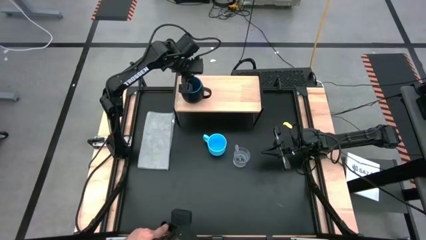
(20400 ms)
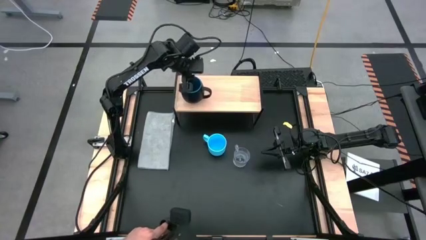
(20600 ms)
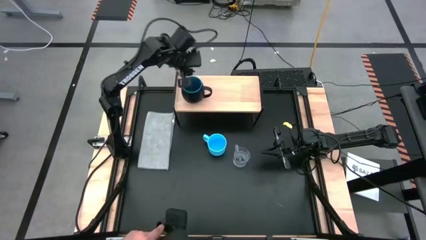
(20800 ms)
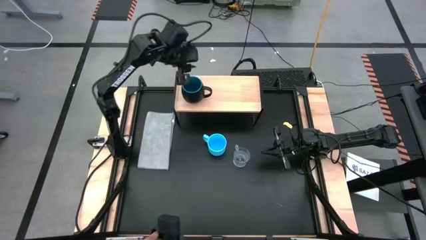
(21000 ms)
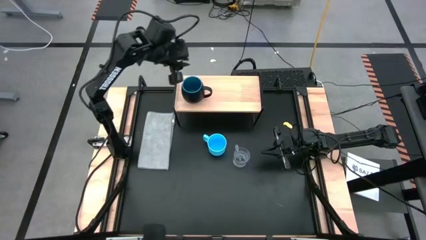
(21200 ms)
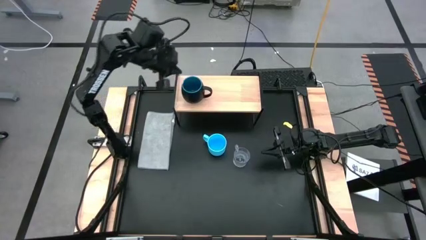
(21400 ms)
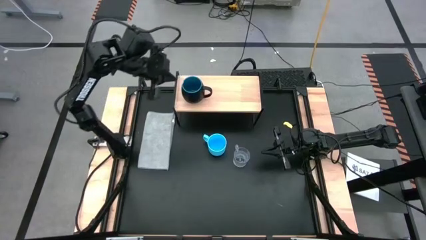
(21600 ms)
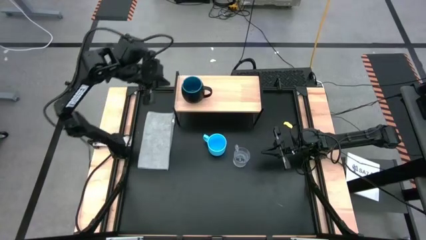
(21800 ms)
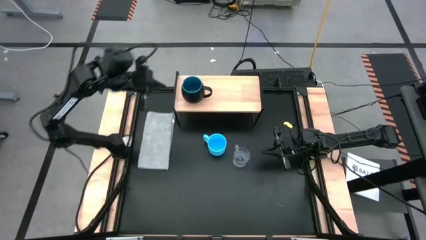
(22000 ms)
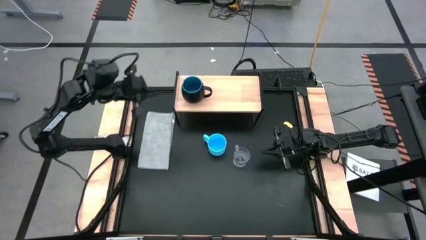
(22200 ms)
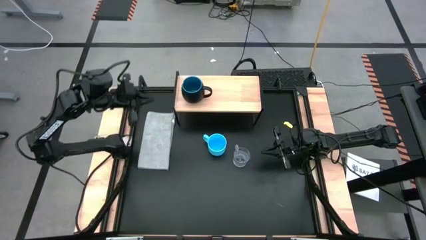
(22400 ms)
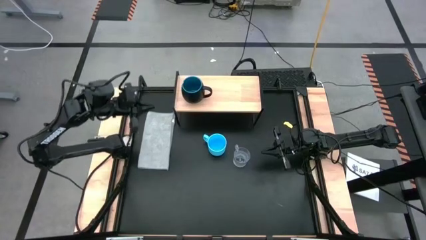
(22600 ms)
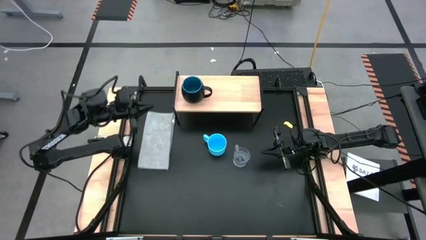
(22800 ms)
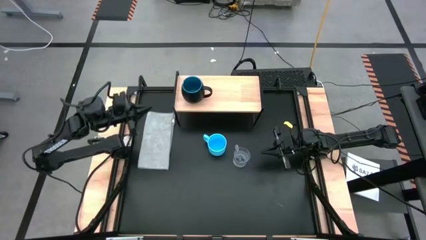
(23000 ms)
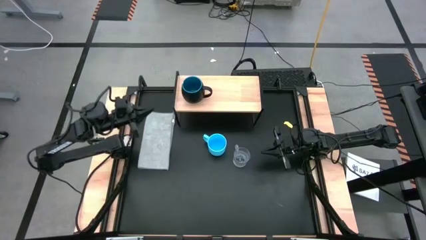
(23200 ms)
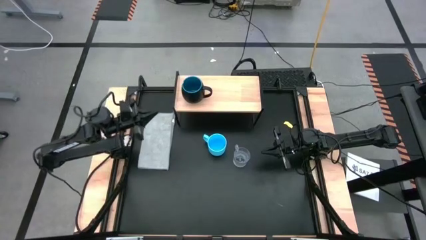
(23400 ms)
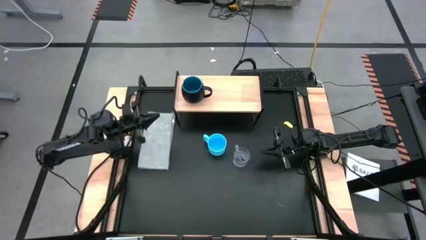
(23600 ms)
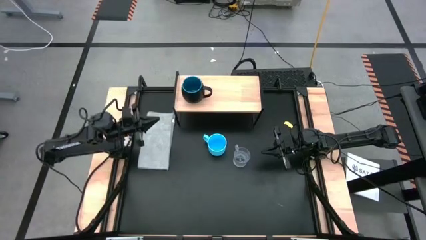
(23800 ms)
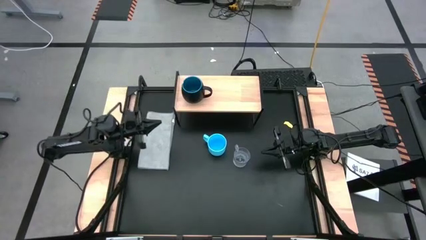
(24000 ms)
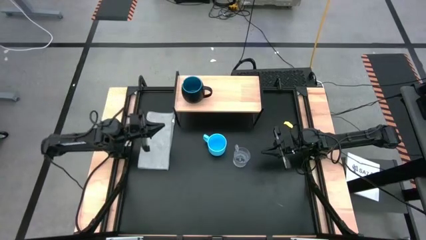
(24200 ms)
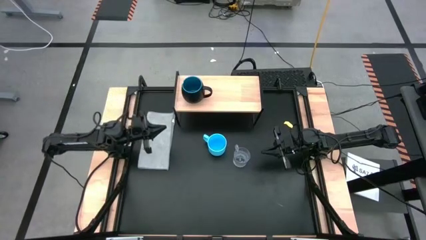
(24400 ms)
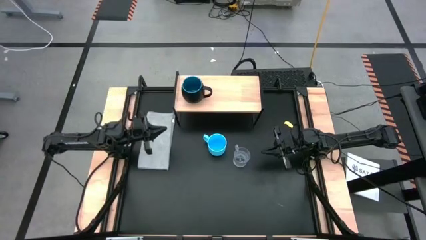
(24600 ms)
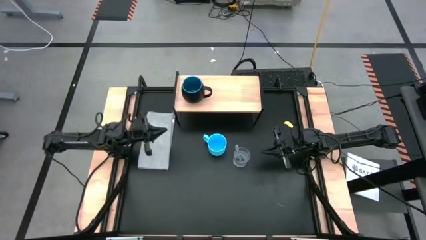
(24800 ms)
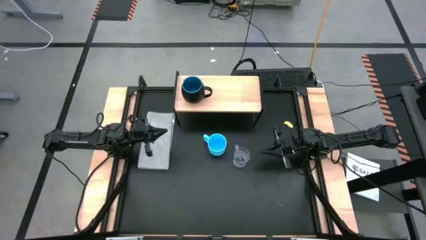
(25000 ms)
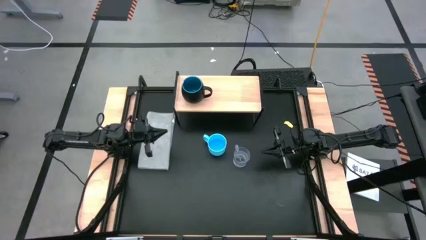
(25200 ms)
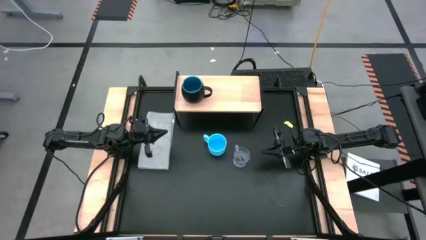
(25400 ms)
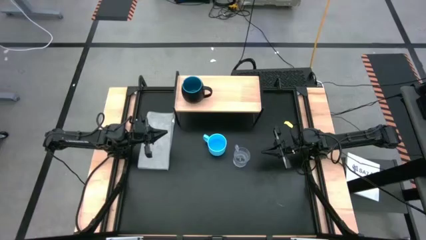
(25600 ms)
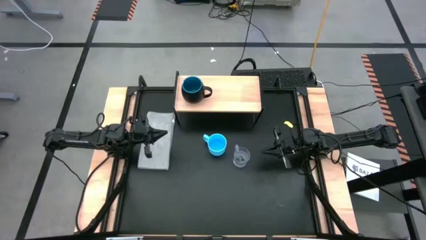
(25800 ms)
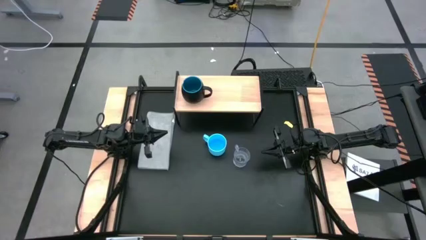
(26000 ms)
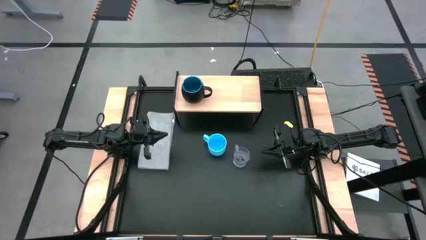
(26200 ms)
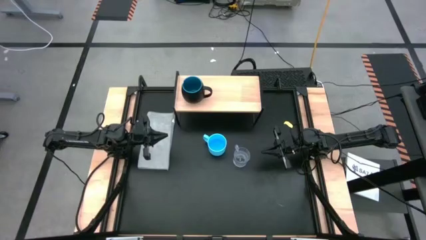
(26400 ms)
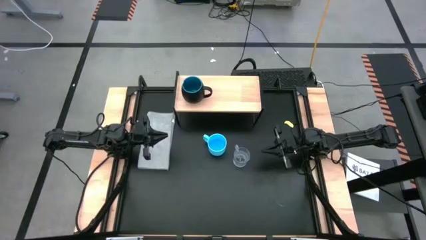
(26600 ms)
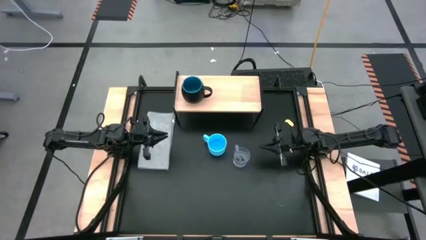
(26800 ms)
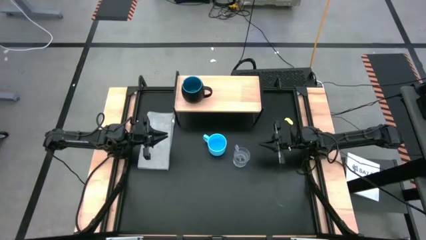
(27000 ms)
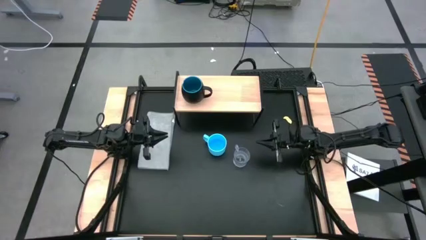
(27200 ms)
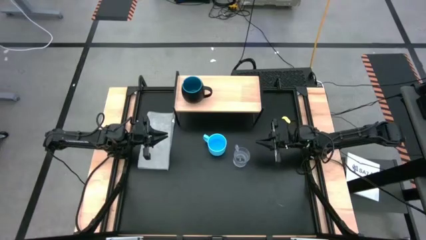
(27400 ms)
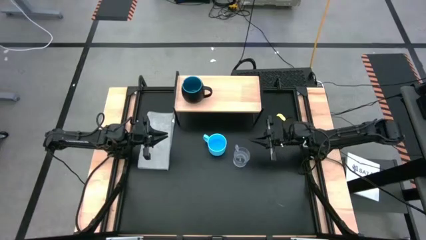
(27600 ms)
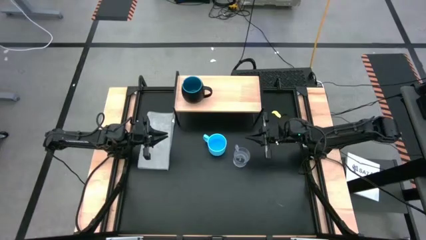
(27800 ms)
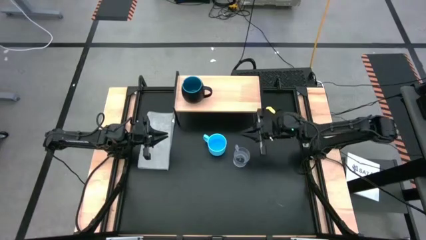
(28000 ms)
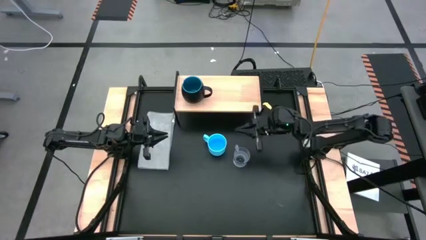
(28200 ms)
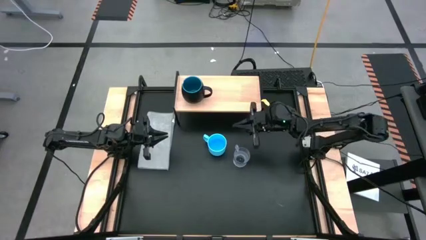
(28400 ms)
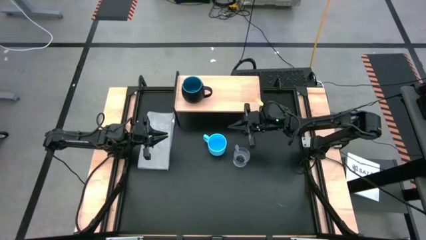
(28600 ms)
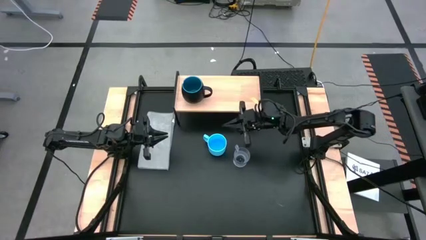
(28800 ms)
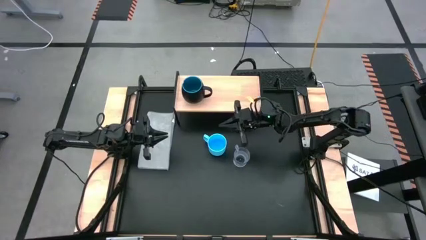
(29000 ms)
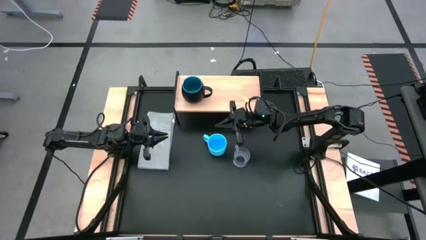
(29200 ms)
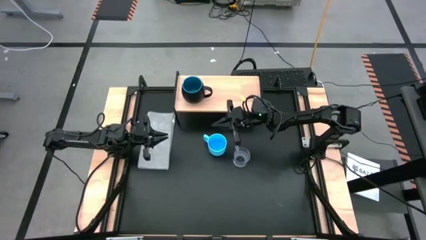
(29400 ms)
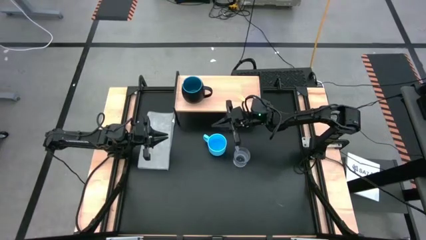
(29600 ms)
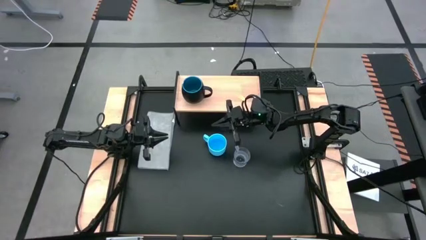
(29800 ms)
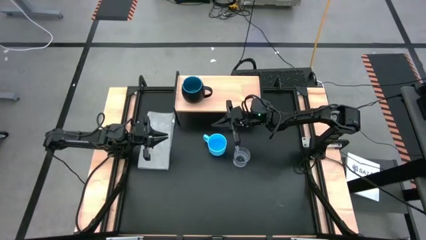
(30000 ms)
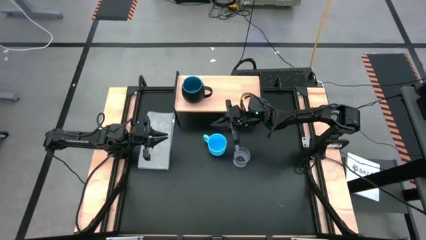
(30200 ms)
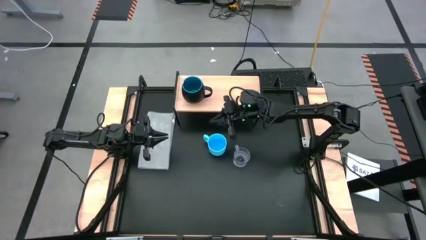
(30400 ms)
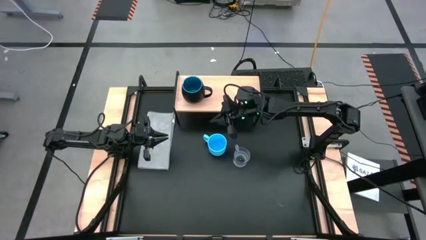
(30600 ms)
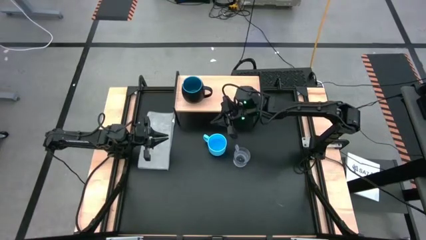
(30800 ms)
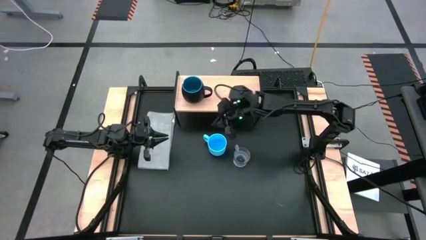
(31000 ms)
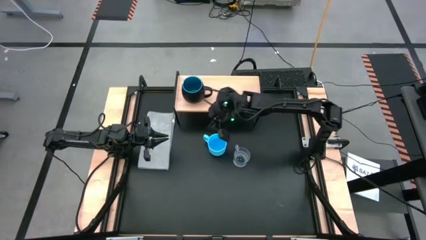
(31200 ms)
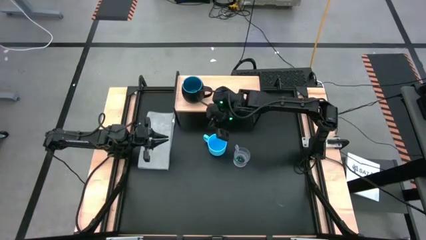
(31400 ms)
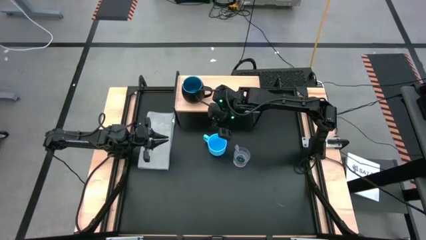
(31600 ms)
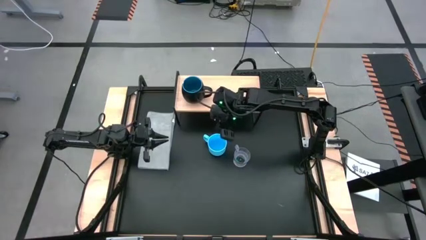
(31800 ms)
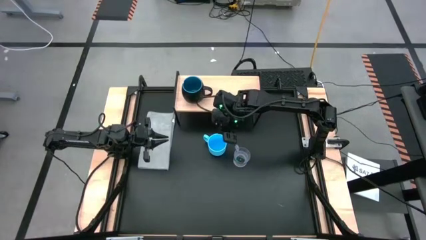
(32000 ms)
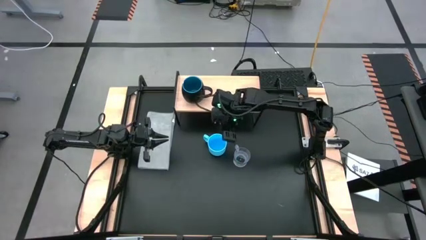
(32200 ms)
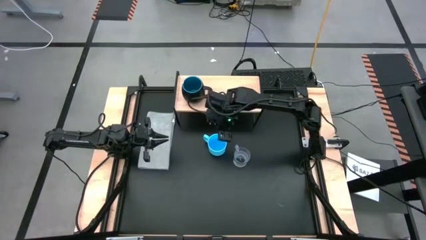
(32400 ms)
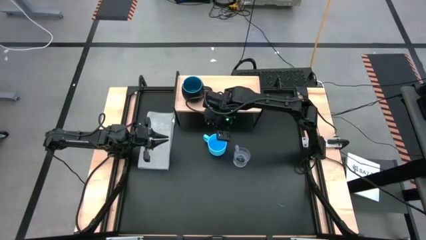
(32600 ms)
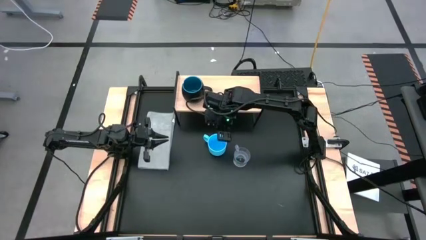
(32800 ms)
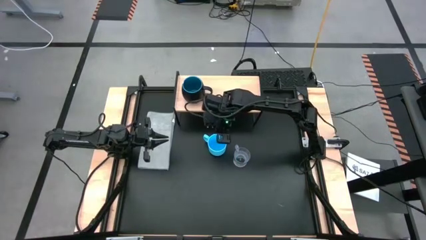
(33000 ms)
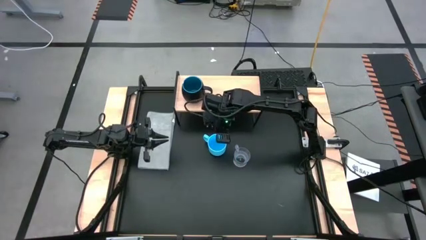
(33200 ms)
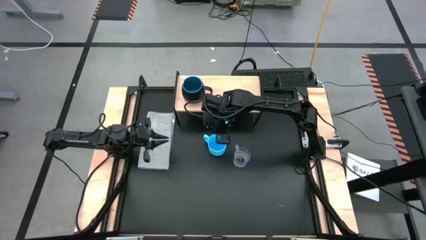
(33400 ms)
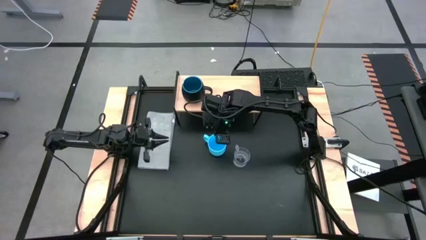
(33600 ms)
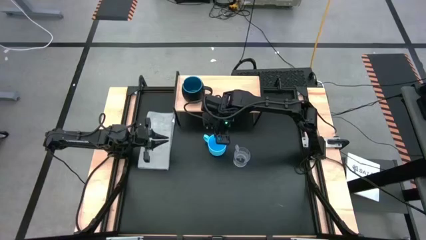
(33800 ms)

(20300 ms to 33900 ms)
Task: Stack small to large cups/mugs on shelf
Put the blue cup on the shelf
